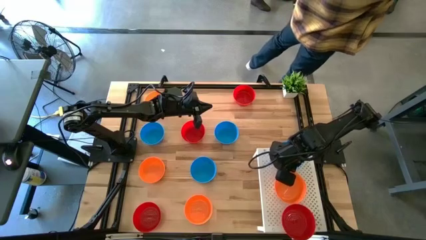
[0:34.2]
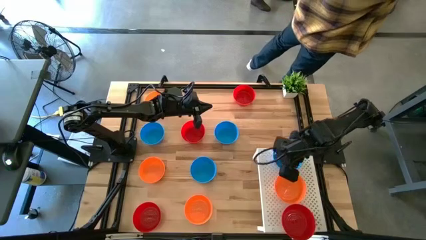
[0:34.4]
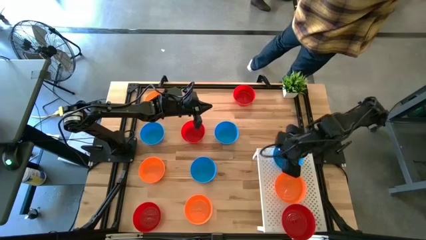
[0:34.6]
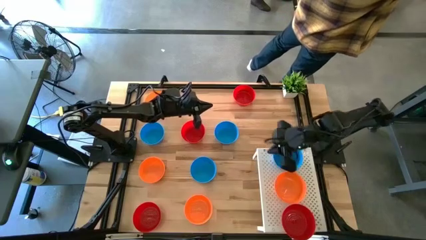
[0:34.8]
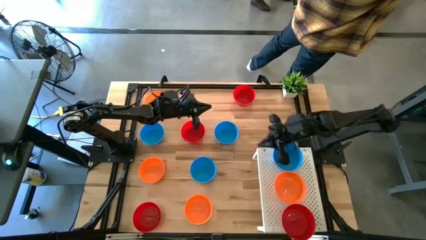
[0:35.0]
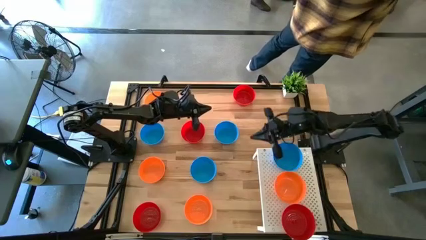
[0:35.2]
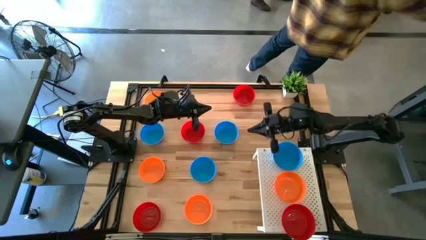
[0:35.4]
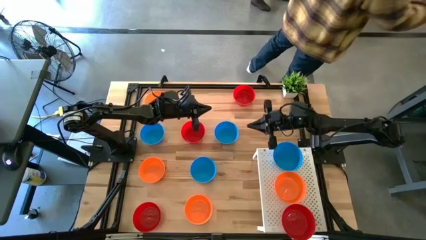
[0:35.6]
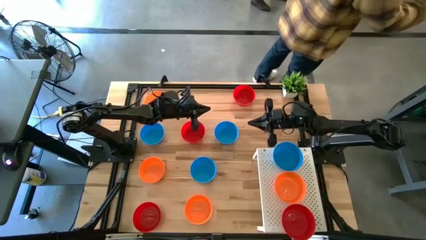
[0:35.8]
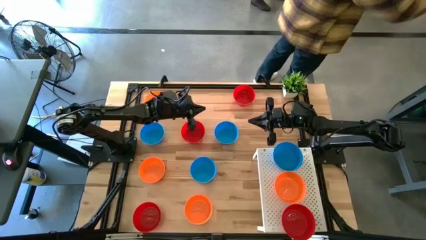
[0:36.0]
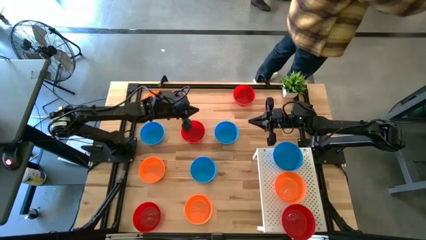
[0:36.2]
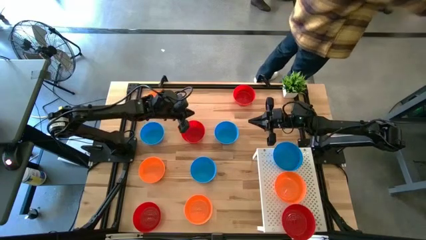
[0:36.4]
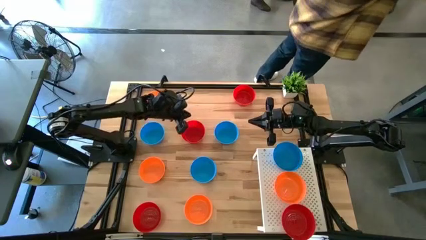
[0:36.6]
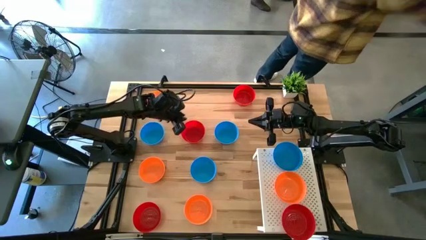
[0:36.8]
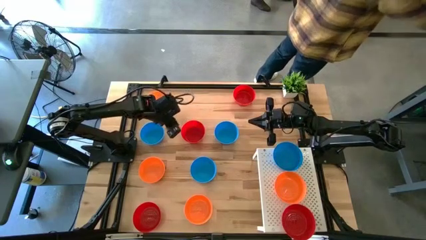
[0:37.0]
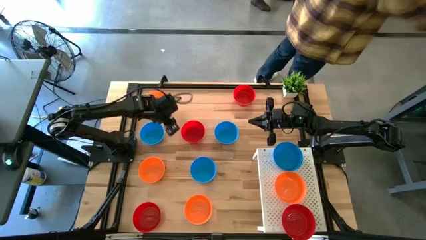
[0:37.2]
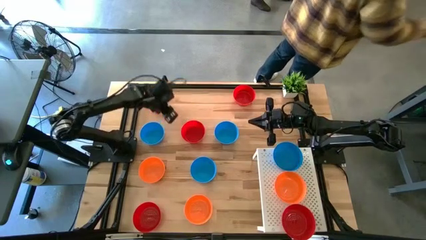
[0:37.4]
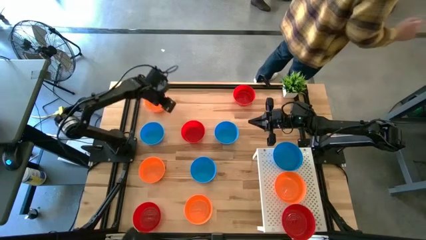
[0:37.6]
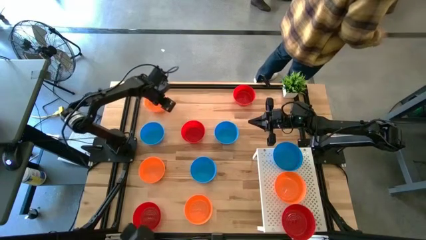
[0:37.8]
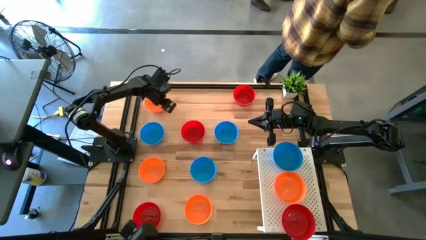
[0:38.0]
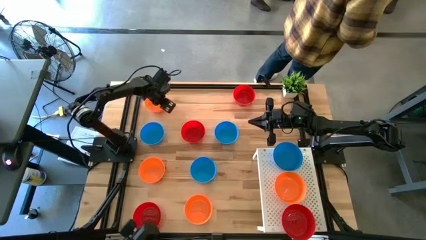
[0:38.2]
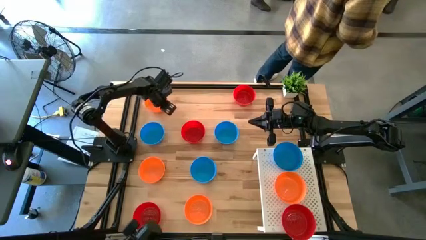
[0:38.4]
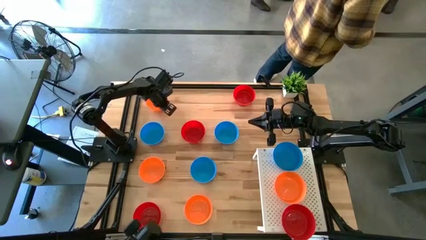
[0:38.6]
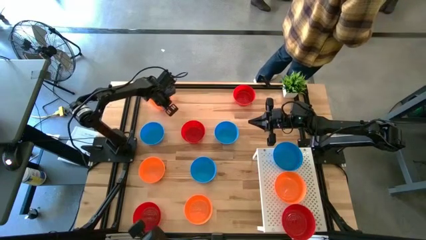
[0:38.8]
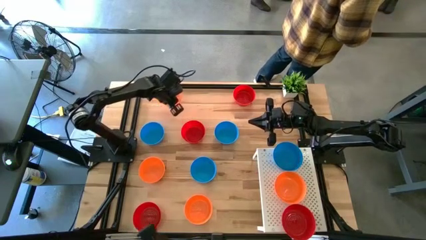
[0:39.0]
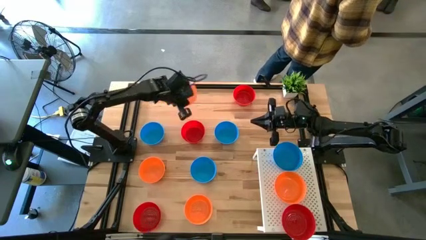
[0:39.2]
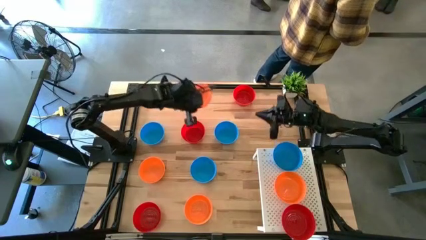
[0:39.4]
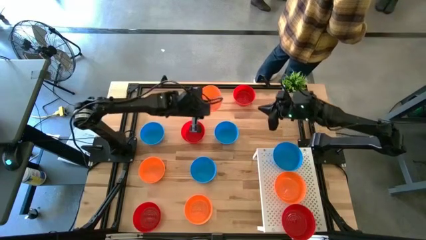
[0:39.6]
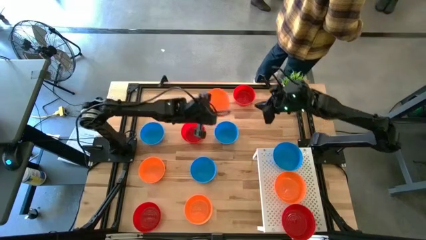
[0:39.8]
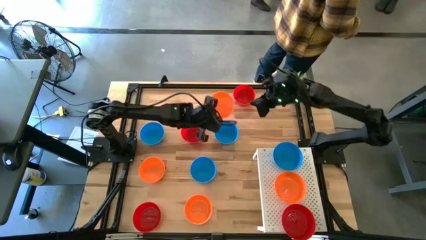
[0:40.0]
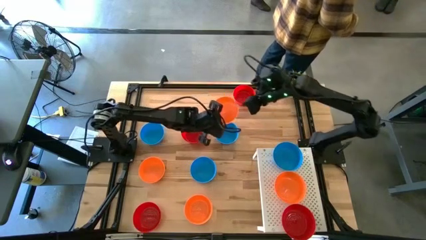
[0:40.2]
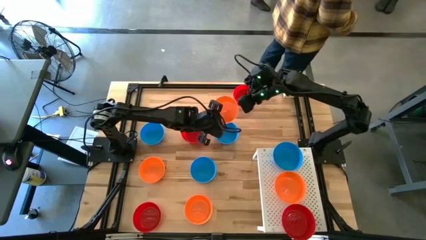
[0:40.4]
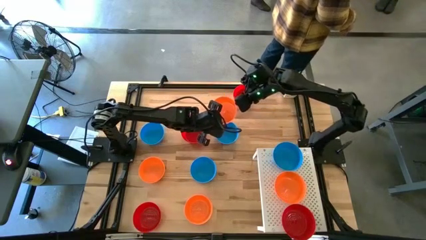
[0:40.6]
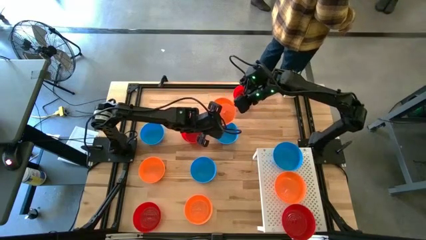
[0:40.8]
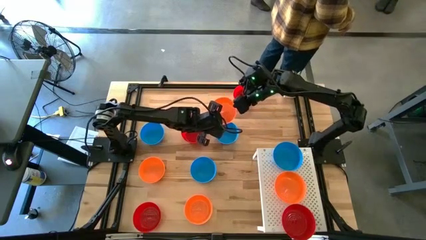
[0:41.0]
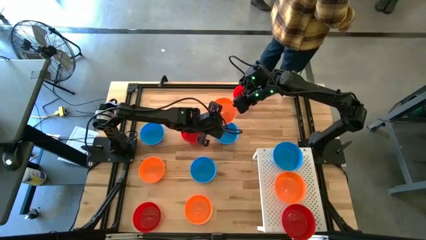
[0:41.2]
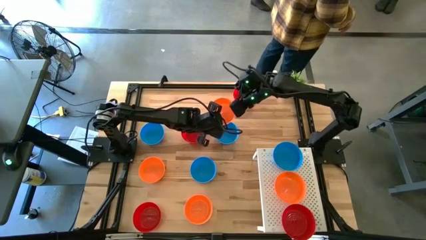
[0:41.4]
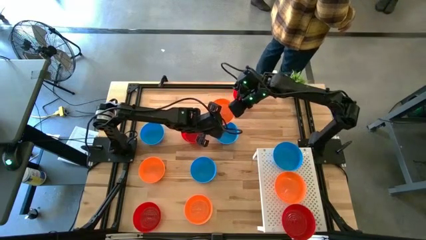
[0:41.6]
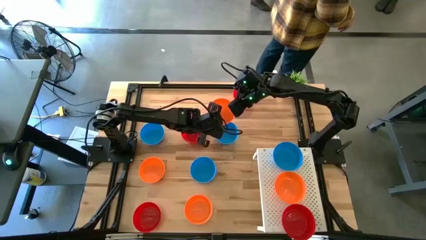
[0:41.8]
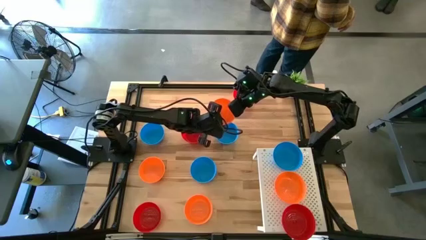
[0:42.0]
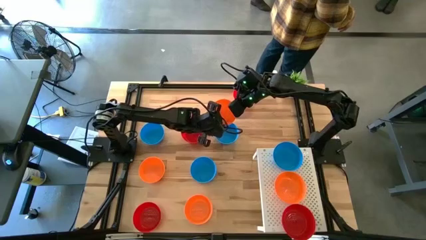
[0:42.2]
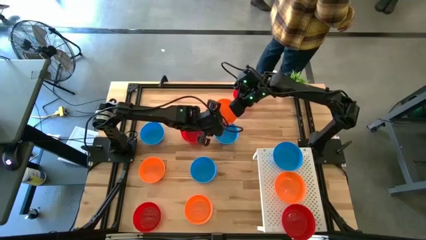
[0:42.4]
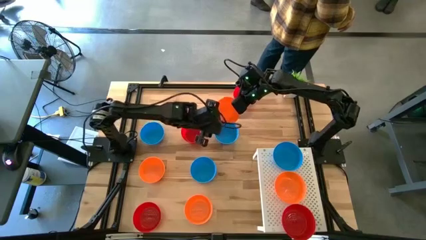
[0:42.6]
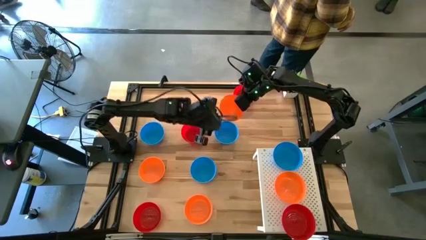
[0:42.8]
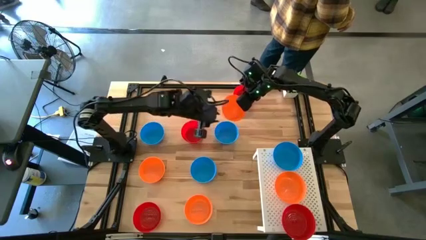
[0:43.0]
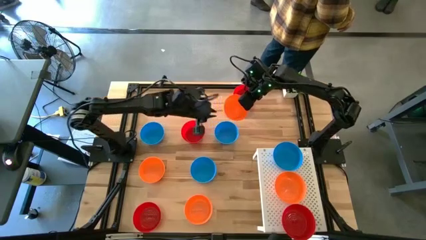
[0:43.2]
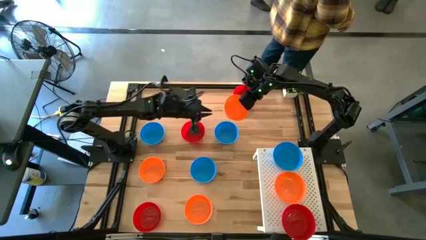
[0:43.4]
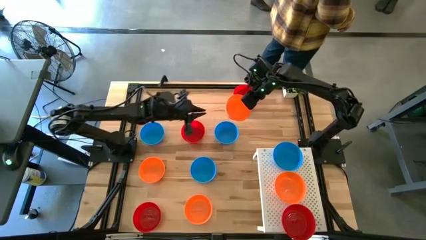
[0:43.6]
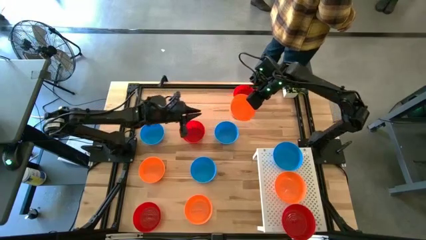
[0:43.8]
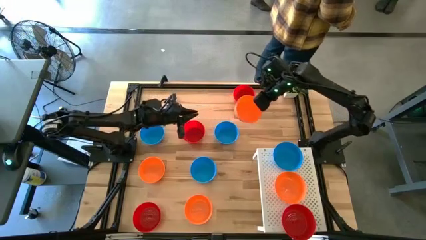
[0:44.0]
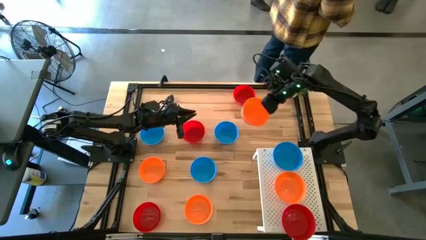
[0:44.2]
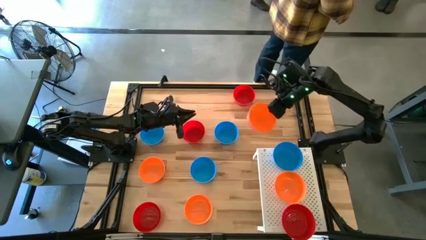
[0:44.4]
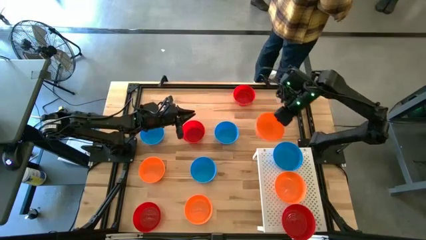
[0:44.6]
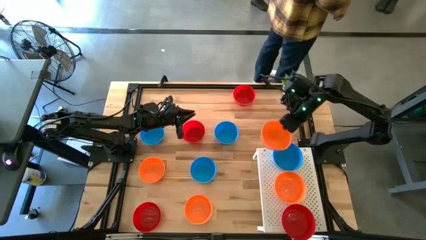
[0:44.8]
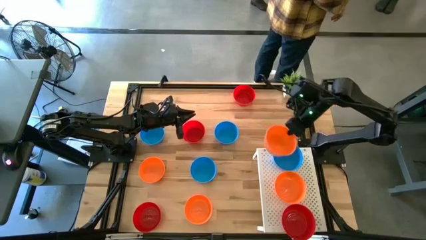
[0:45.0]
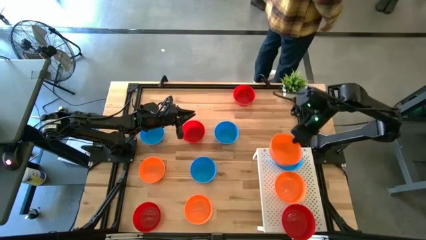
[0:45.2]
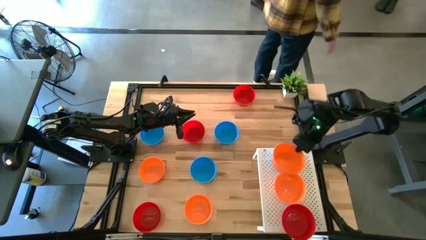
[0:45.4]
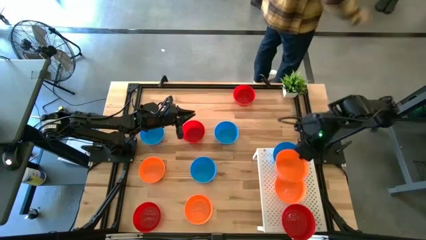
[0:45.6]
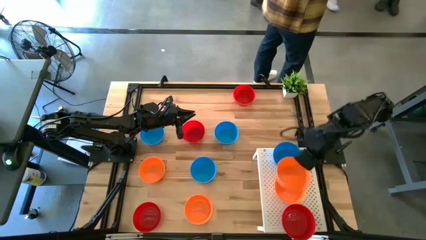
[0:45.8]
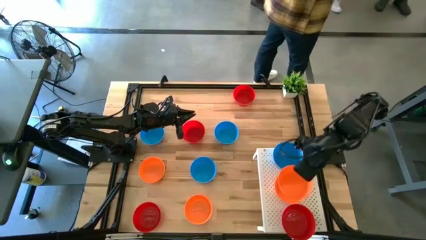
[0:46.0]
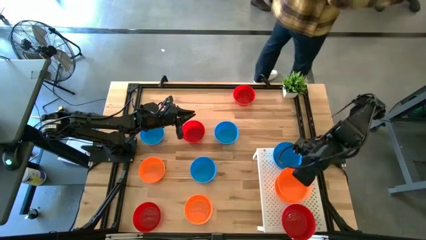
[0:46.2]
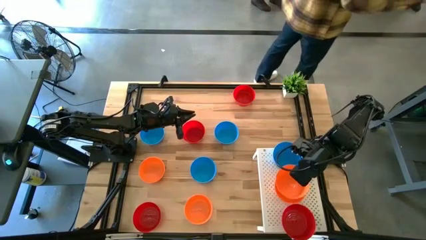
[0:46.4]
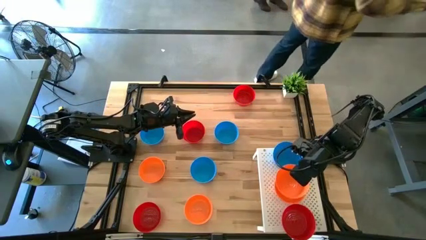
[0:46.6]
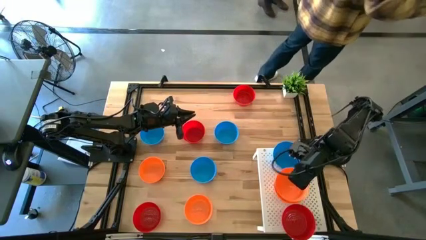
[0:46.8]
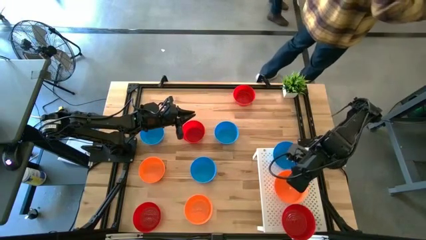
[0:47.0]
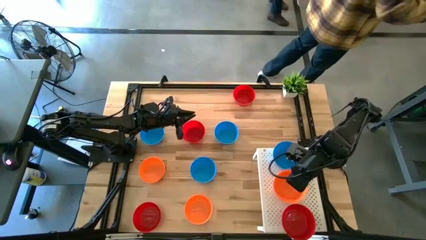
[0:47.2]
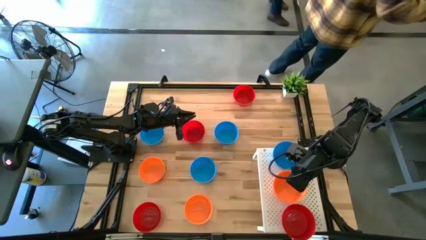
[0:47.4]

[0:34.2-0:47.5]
Task: Pick & Place Mini bowls
Stack the orange bowl on top of the other orange bowl on the shelf
